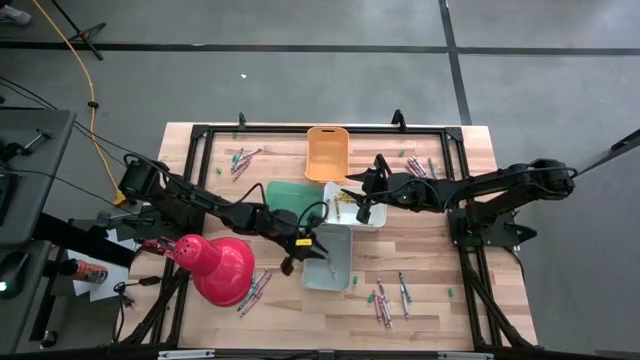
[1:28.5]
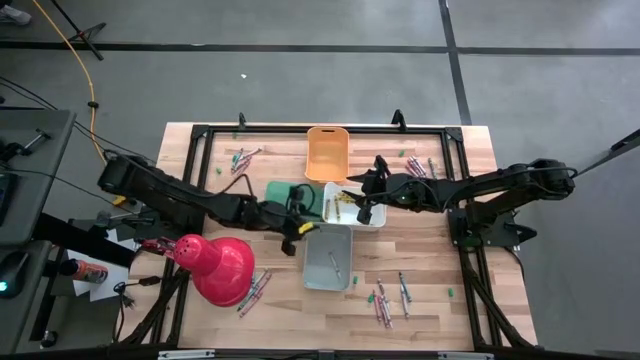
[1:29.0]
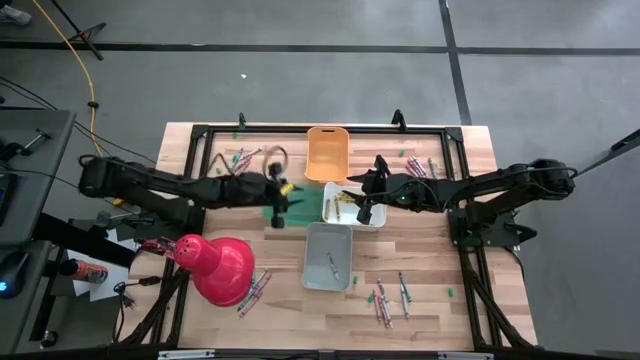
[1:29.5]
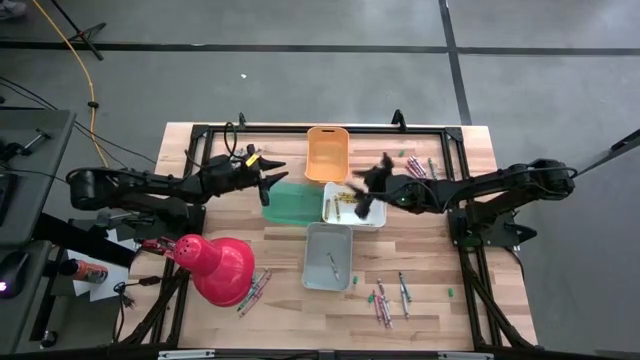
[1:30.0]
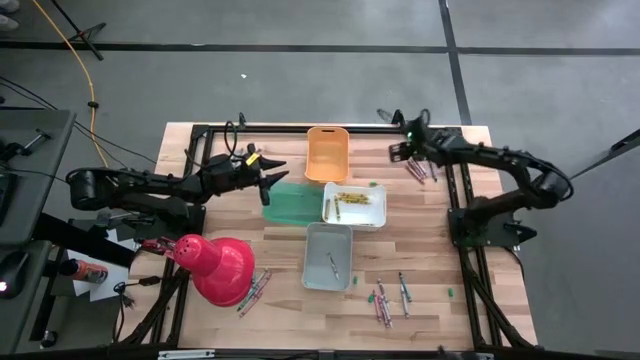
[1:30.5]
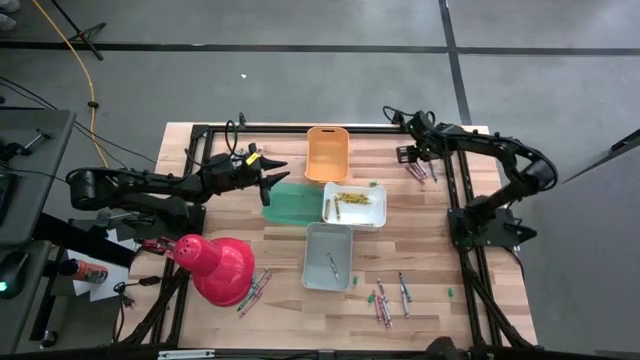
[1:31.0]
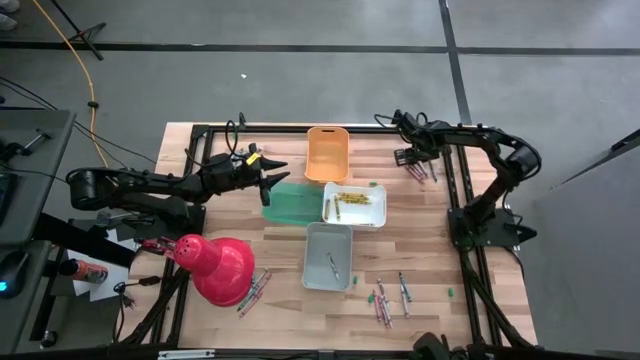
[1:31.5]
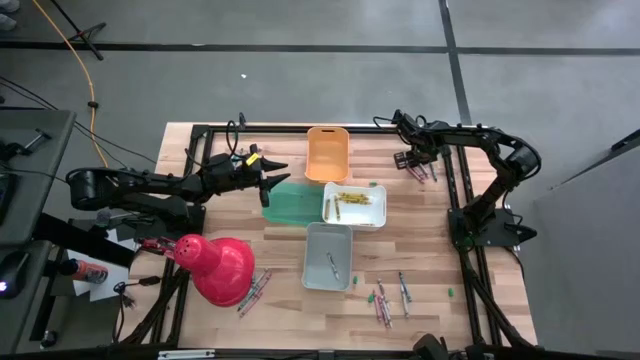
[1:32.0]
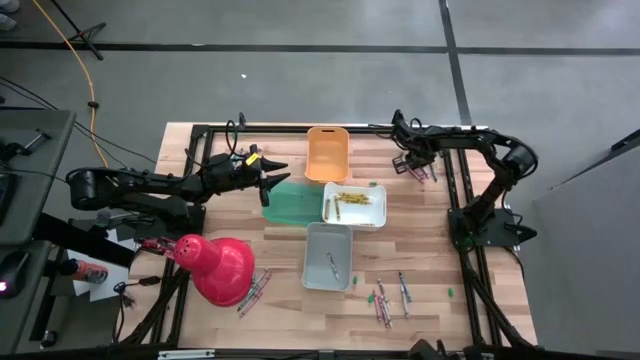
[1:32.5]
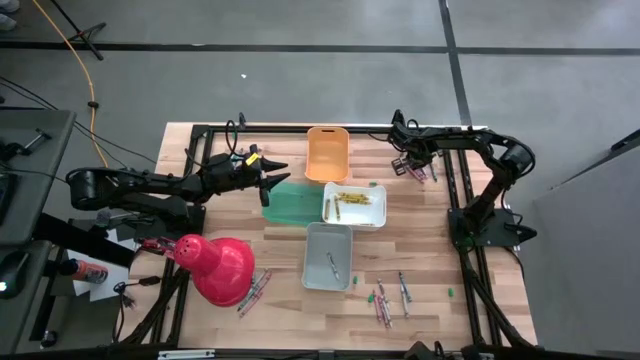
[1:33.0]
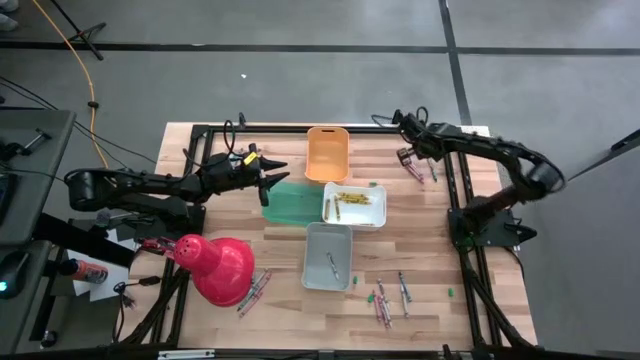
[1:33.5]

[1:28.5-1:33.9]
Task: Sort crayons
Put the white crayon into the gray bin

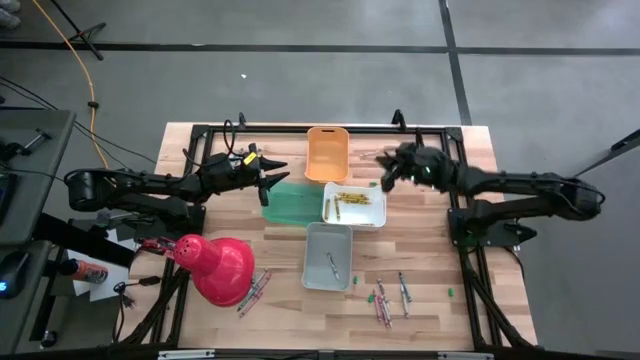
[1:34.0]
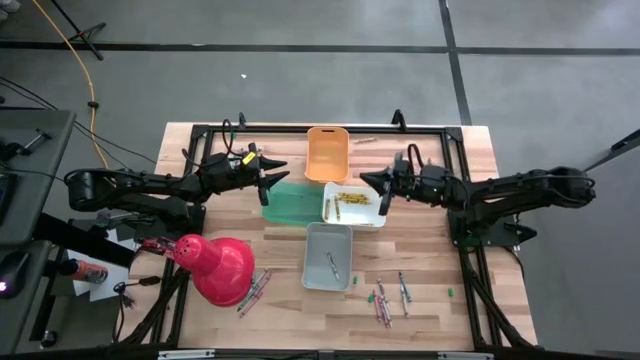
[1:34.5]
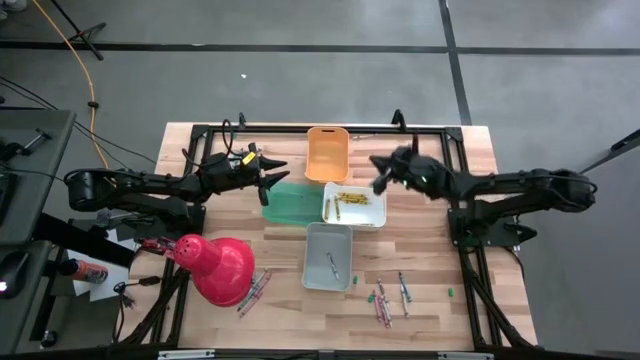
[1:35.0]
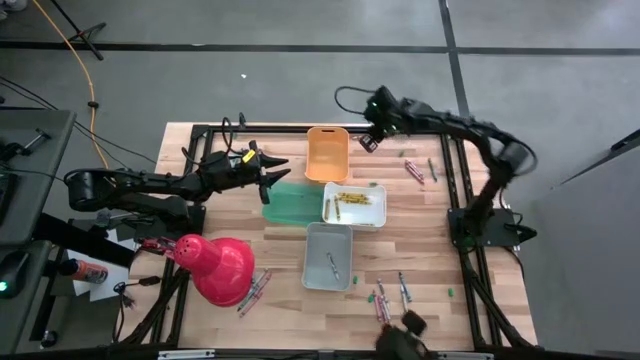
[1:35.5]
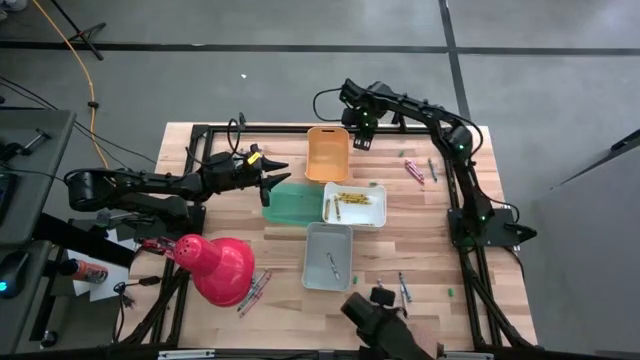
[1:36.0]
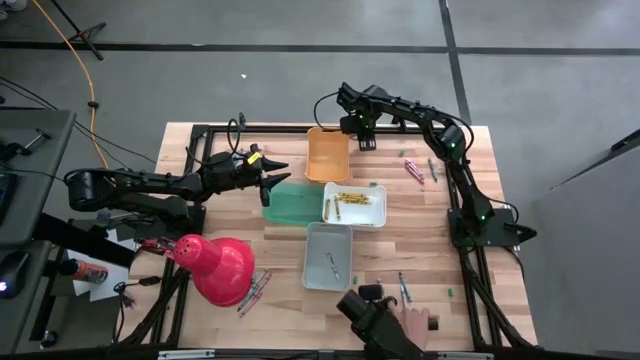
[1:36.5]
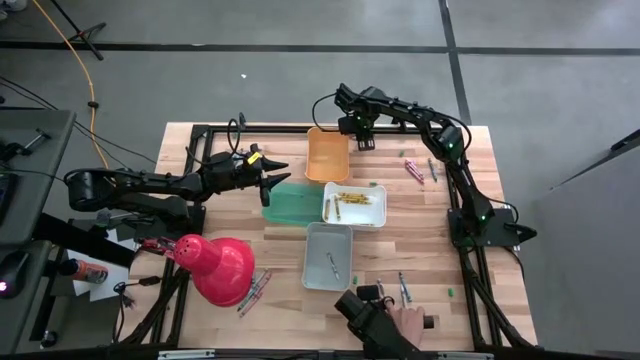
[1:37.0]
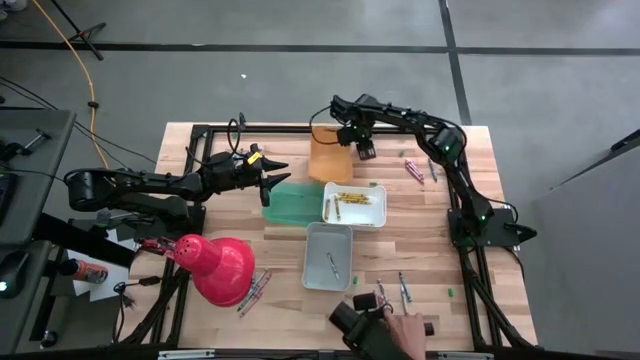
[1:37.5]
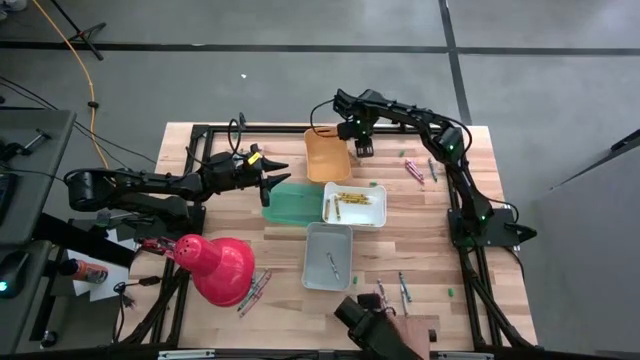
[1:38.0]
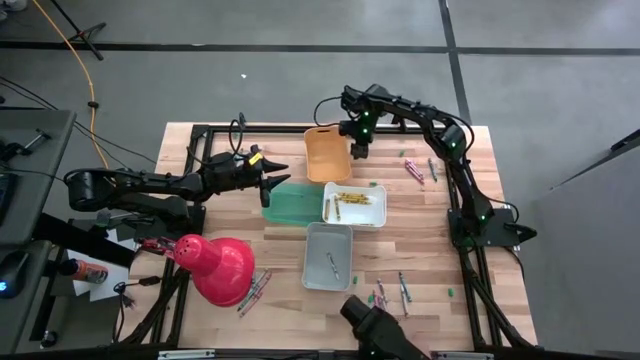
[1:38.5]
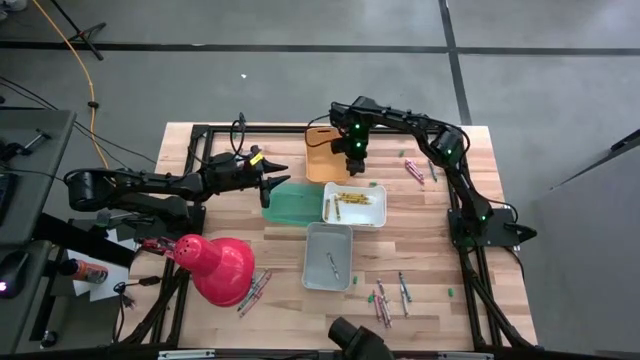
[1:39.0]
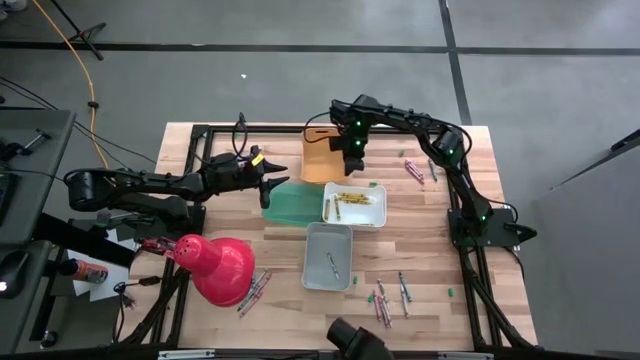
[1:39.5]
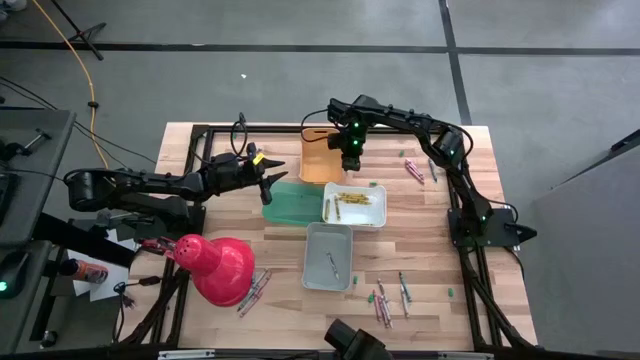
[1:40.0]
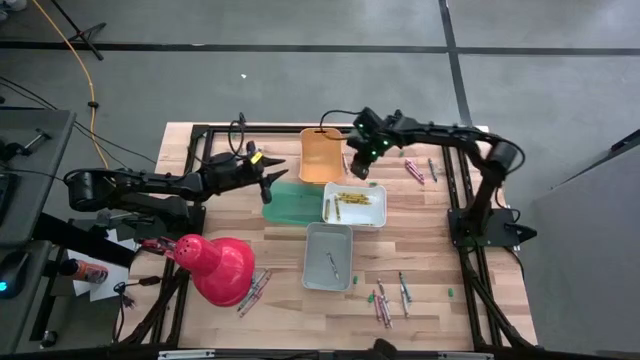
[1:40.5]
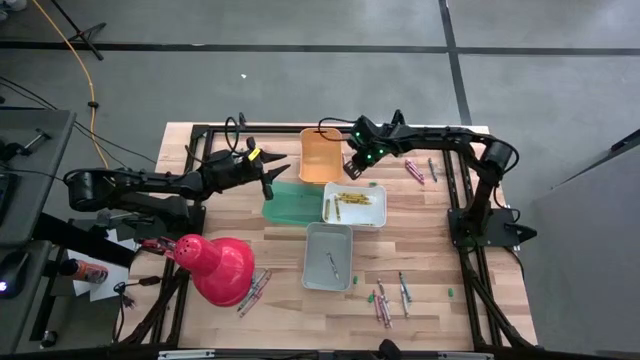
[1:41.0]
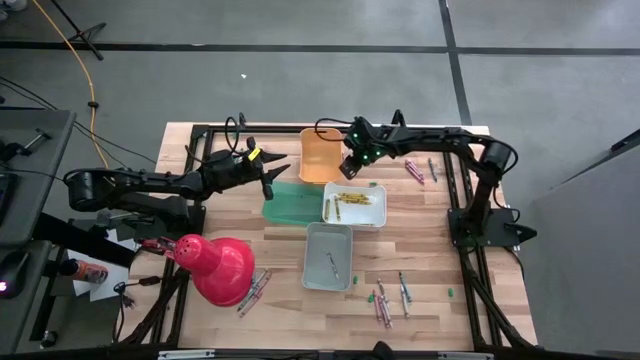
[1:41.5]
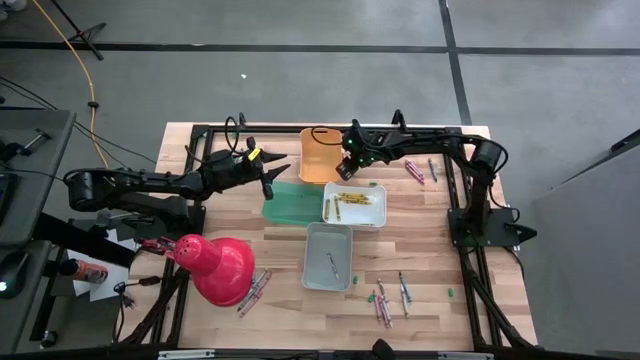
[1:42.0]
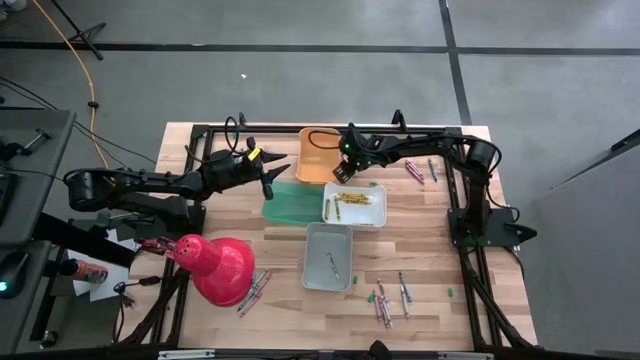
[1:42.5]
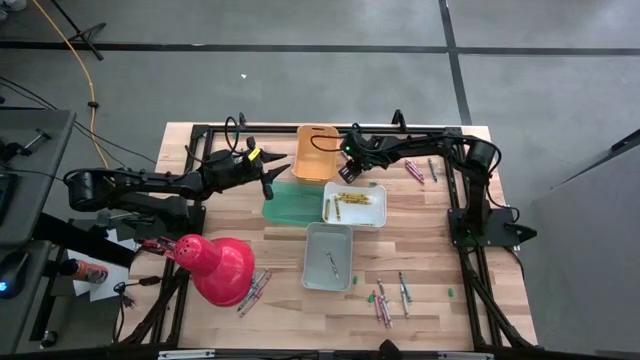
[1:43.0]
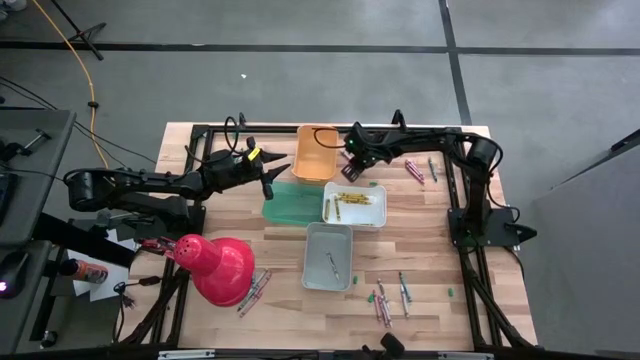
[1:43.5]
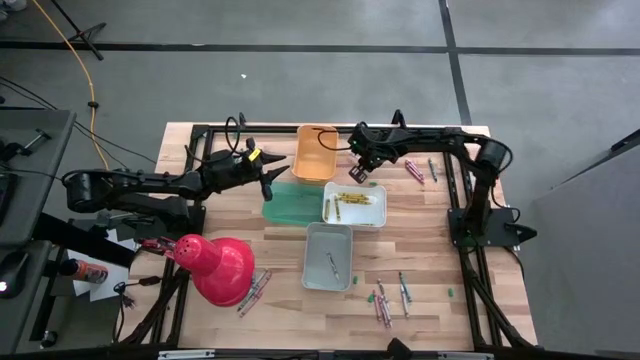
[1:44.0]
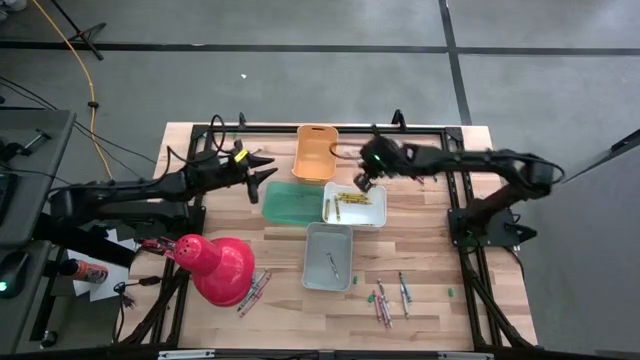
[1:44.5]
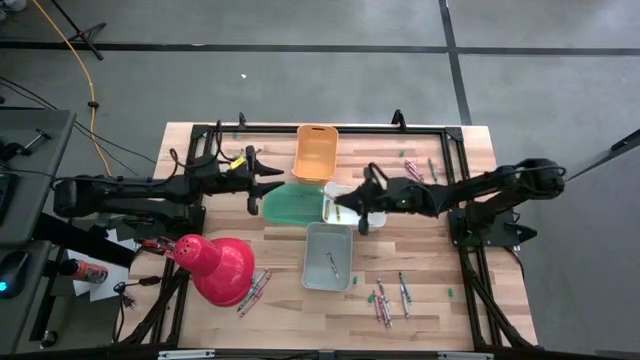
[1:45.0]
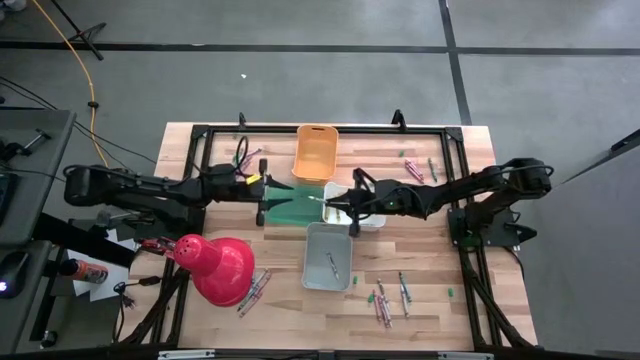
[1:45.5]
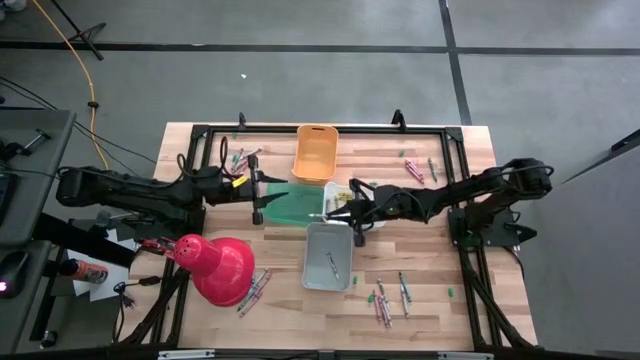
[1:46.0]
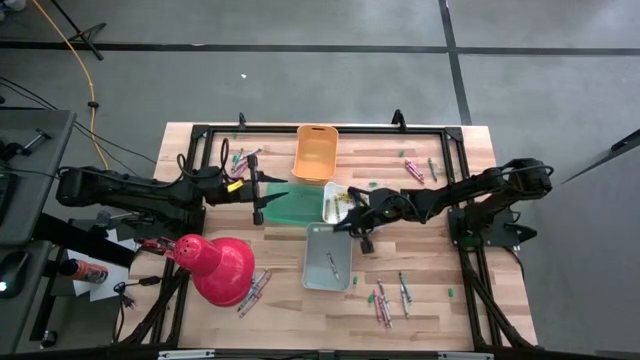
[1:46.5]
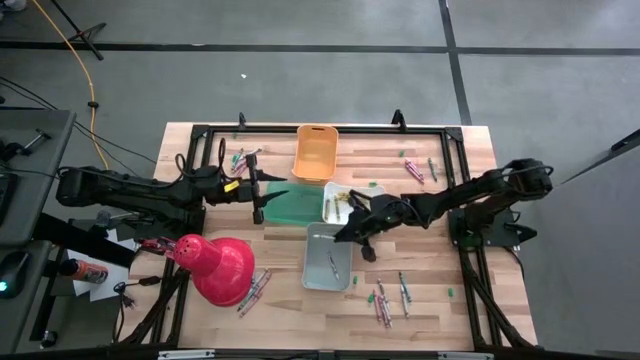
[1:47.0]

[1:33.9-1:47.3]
Put the white crayon into the gray bin

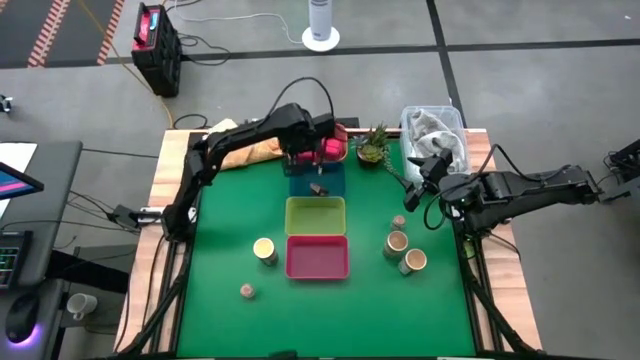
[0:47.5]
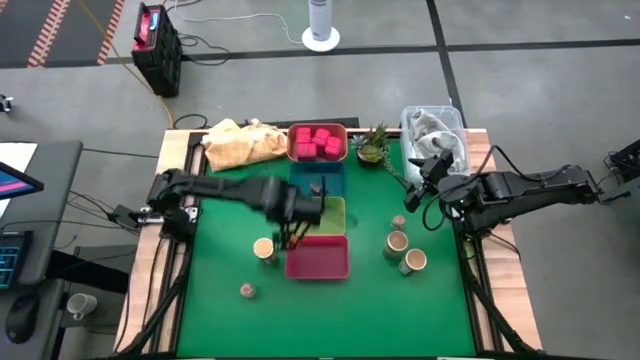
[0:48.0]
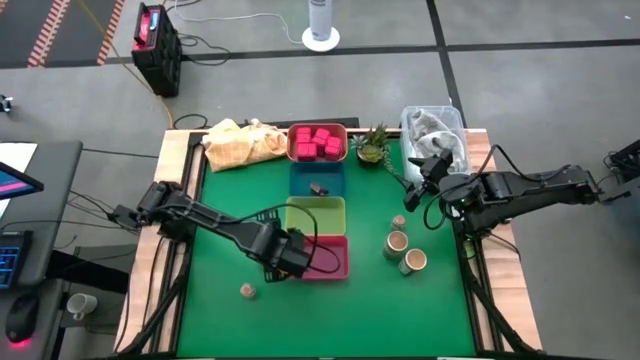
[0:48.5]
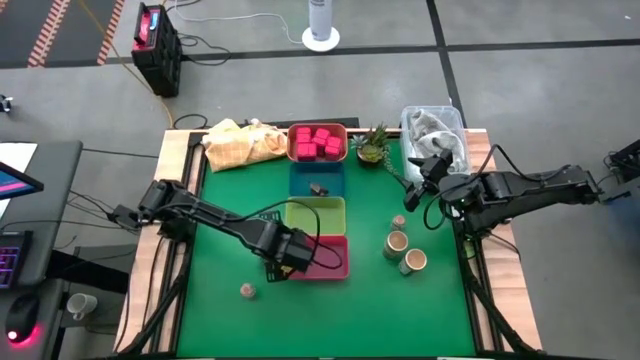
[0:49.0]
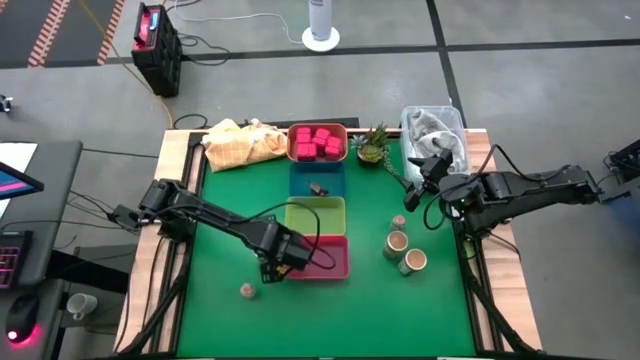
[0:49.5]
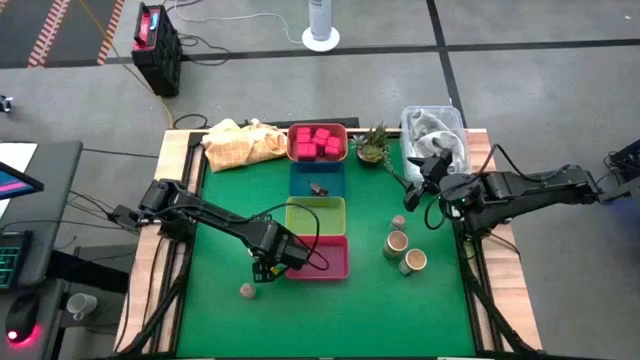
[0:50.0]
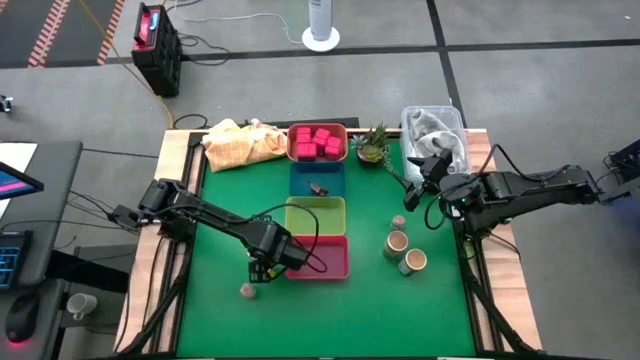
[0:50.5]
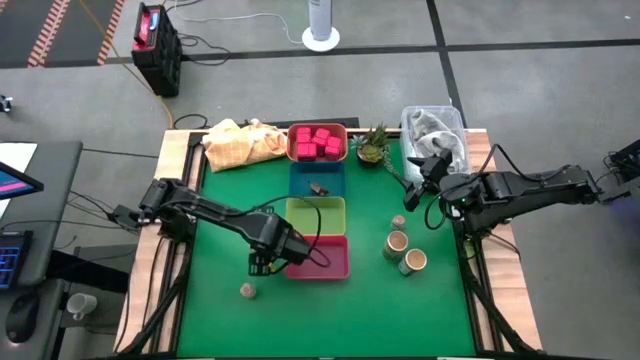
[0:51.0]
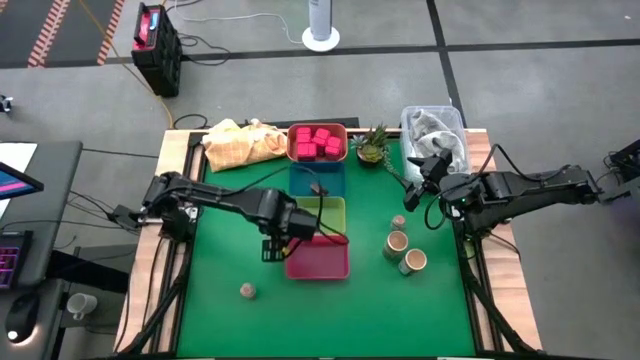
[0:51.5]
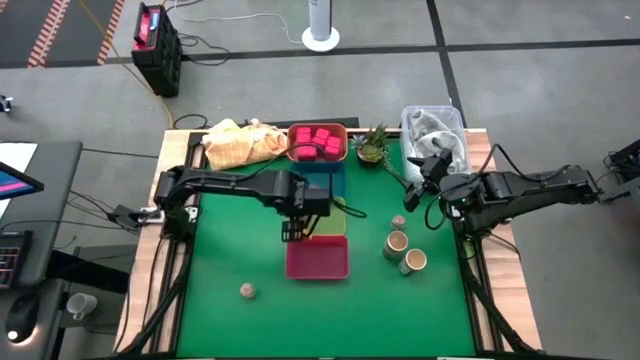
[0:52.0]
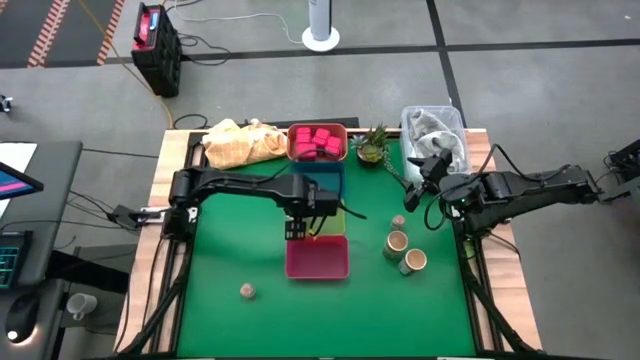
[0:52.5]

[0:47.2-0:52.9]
Task: Sort spices by type
Put the middle left golden seasoning bottle into the yellow bin
